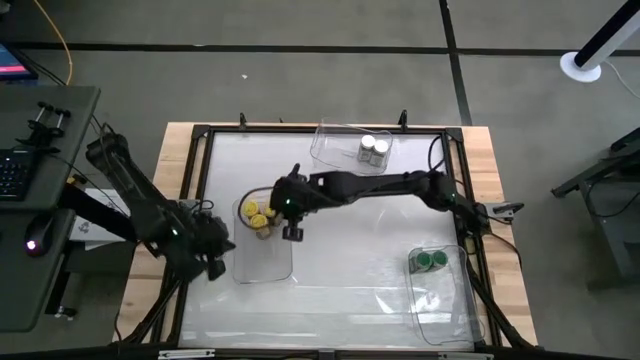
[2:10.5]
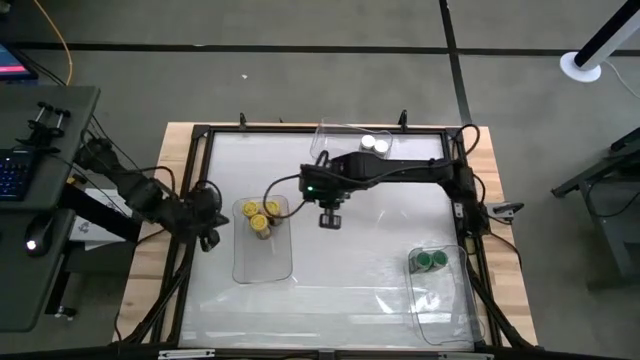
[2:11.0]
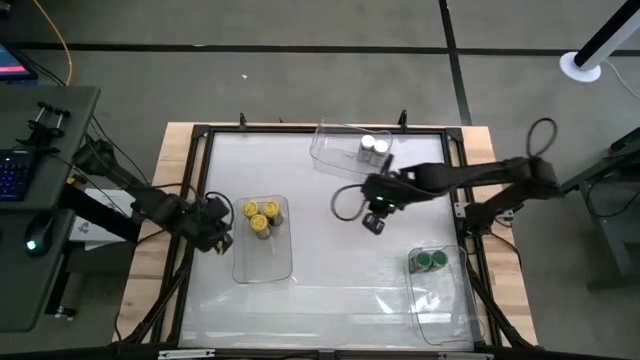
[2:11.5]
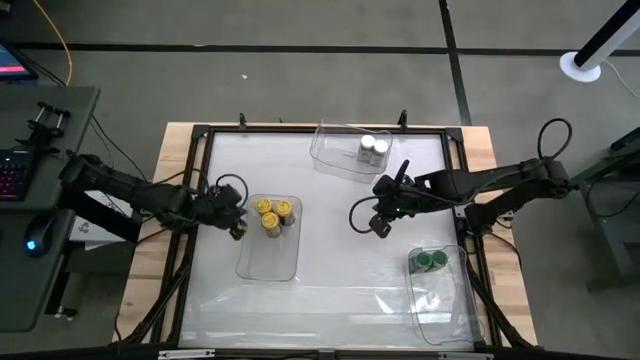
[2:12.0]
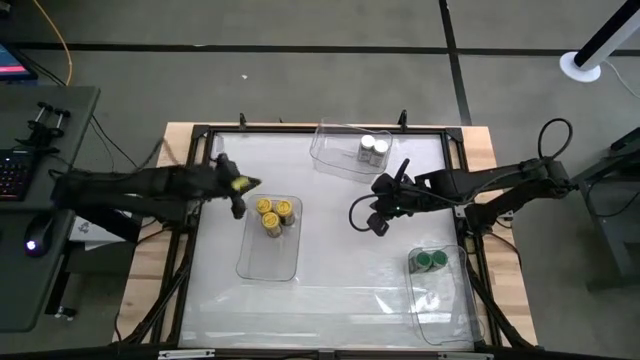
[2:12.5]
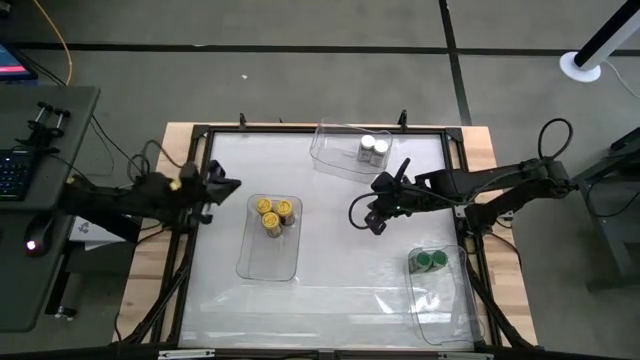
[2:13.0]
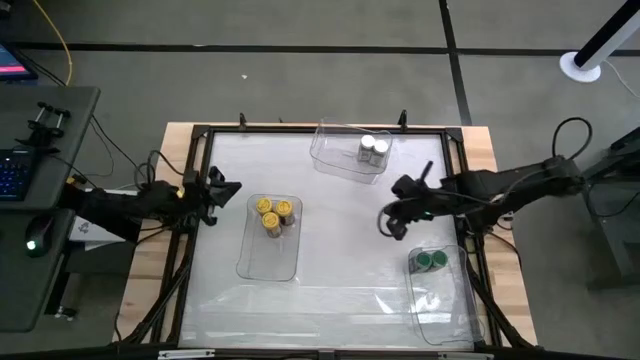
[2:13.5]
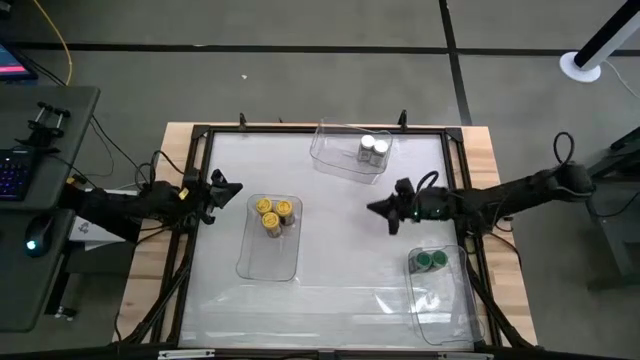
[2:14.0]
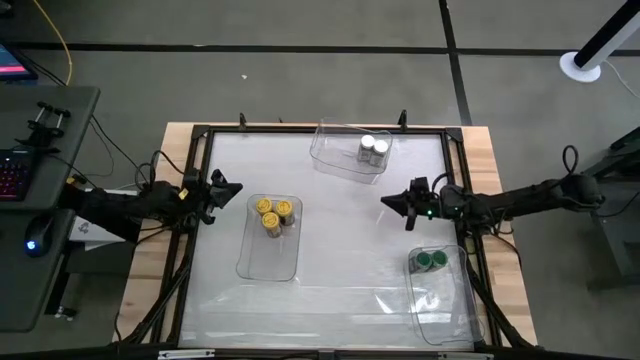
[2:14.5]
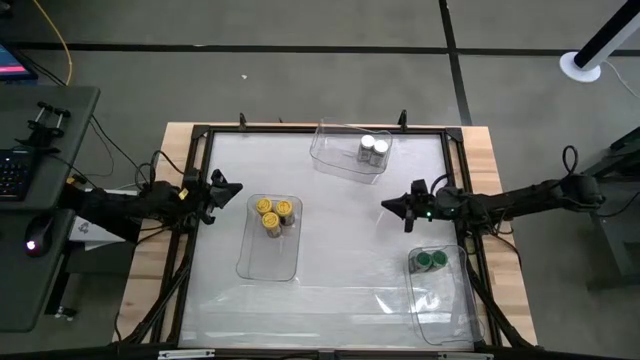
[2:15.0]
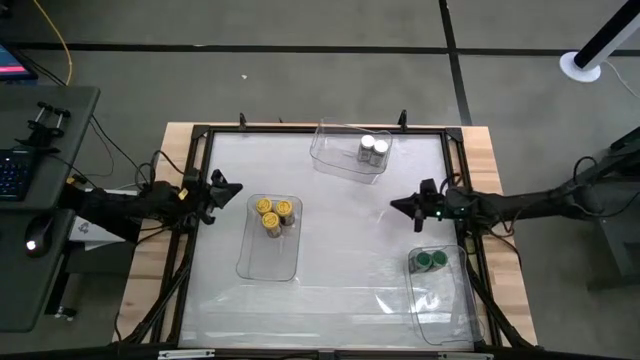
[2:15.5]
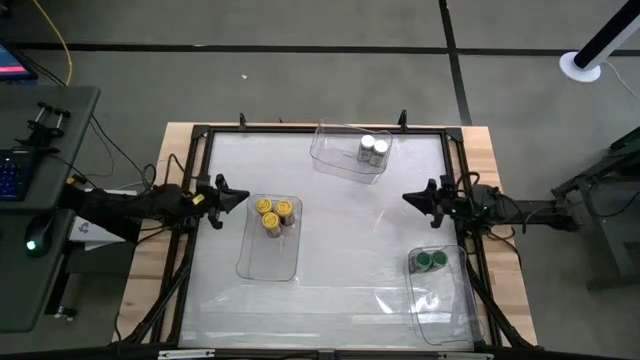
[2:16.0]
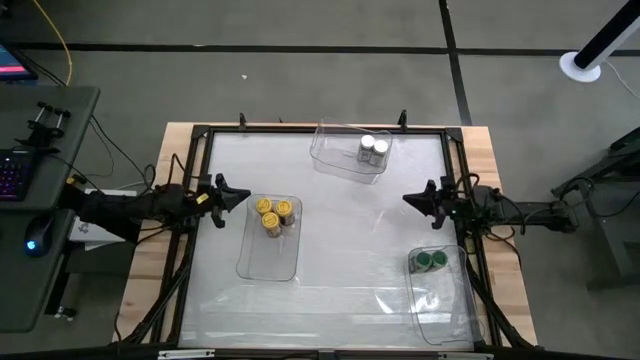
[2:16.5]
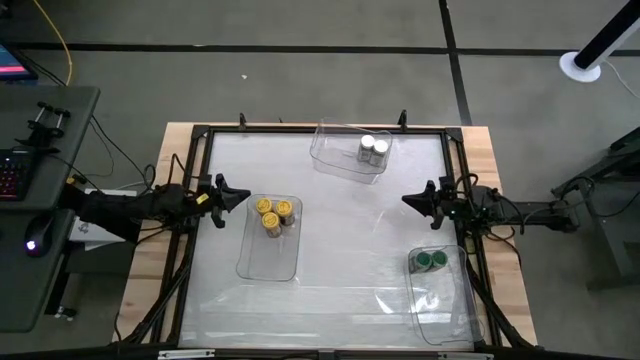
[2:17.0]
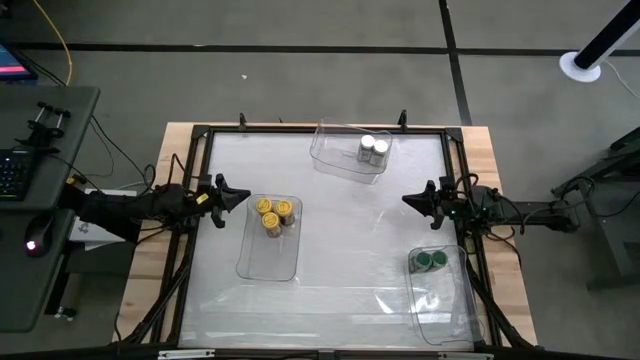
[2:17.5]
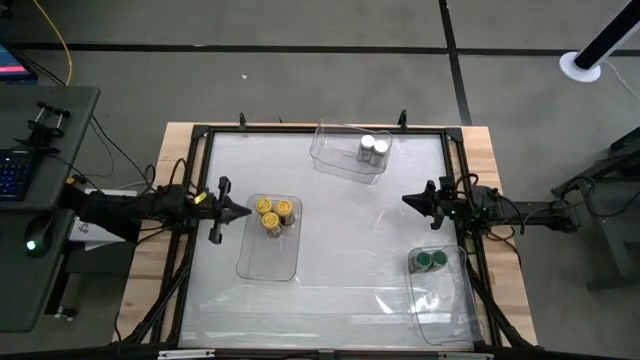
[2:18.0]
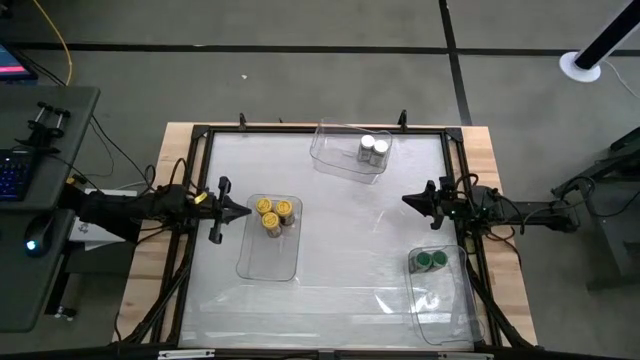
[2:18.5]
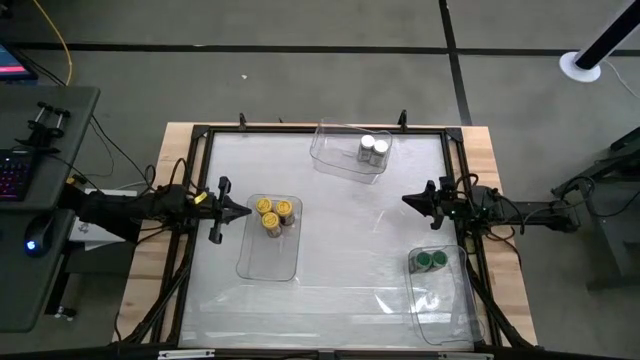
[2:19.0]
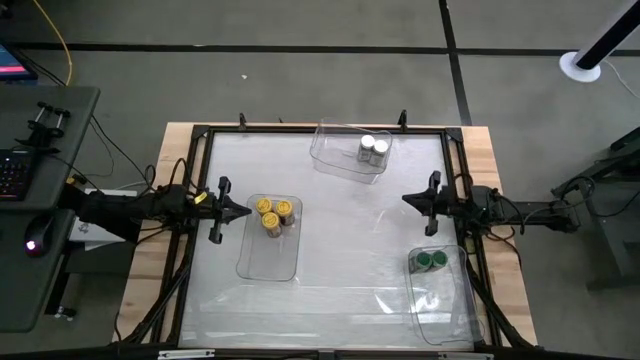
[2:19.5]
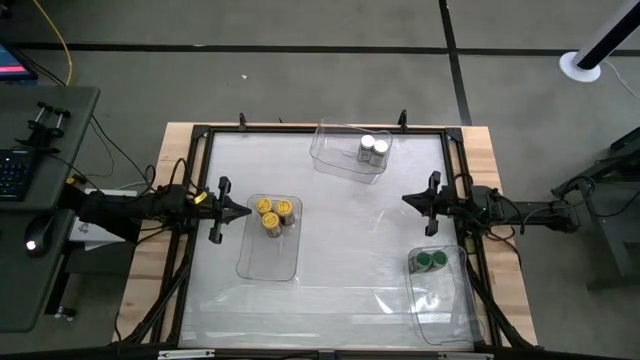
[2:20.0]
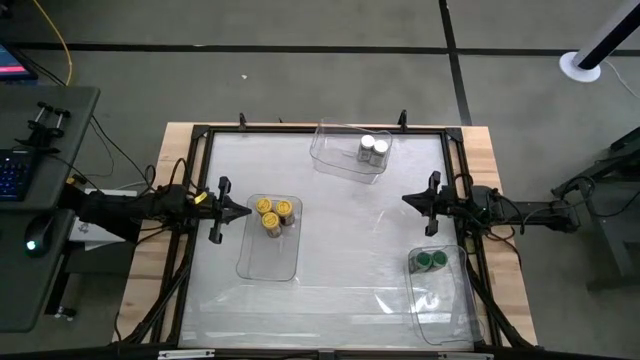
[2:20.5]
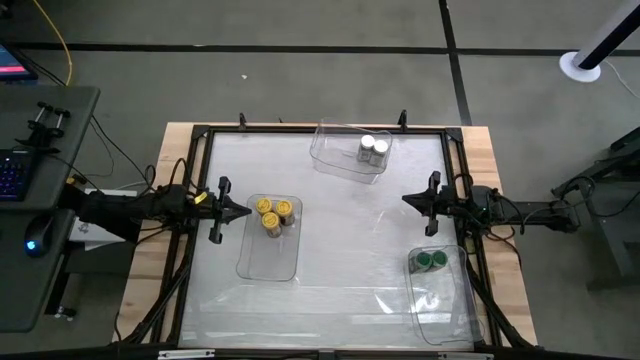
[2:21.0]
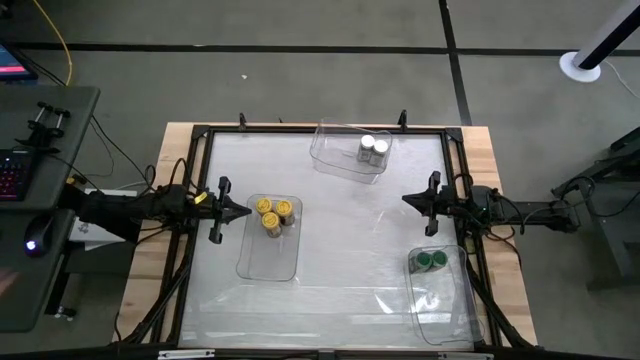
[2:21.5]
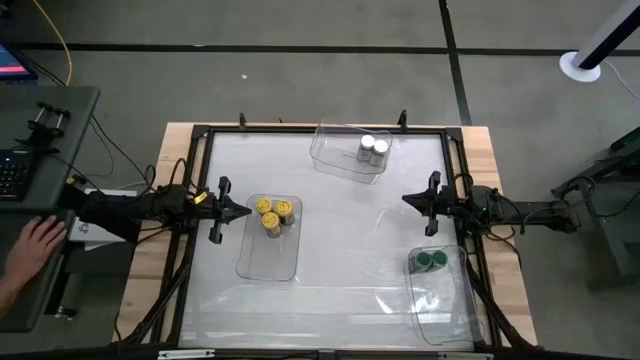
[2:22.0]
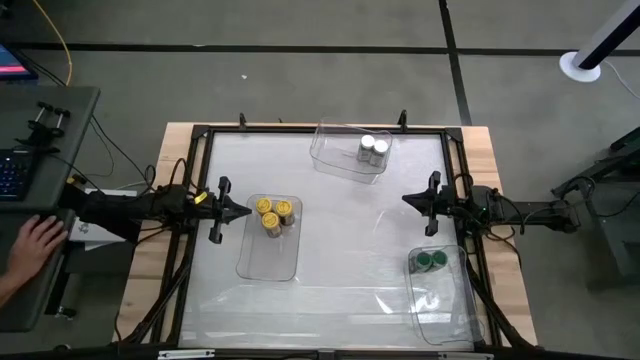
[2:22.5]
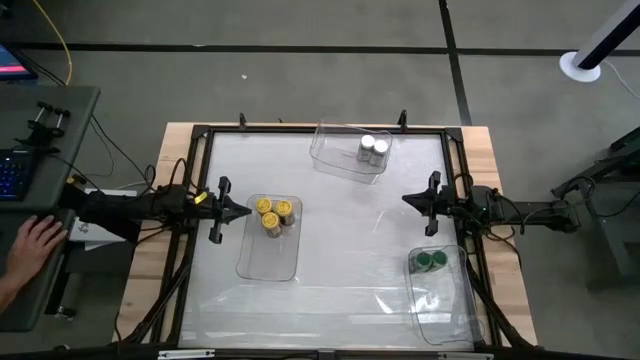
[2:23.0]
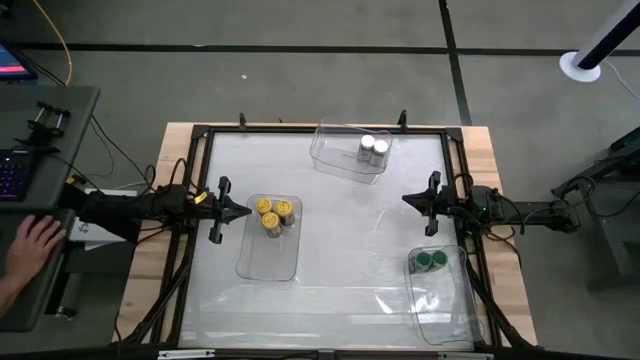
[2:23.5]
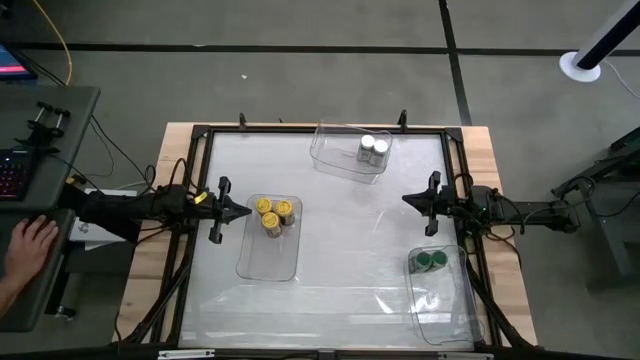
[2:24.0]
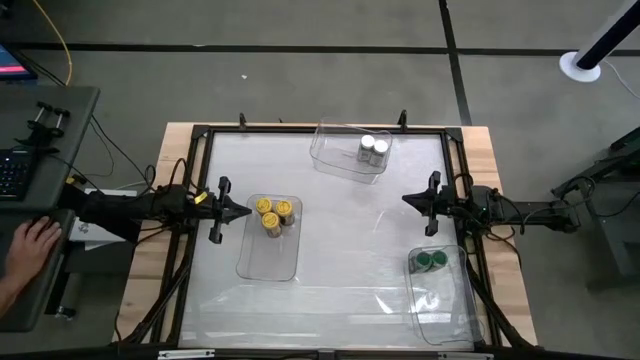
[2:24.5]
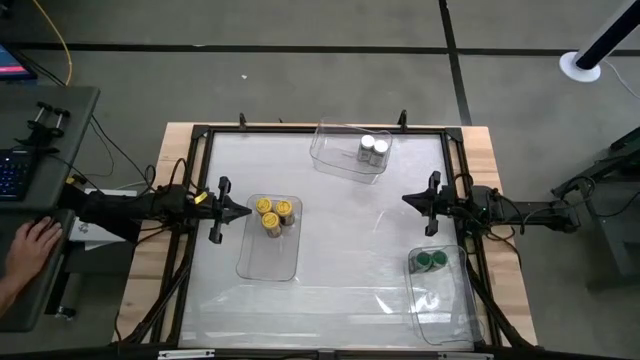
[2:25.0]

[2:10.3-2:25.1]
Task: Sort spices by type
Return to Home Position
